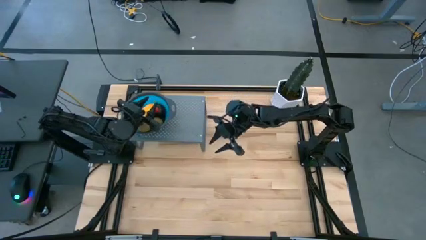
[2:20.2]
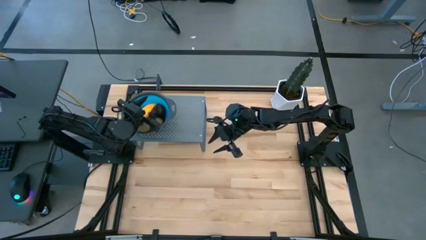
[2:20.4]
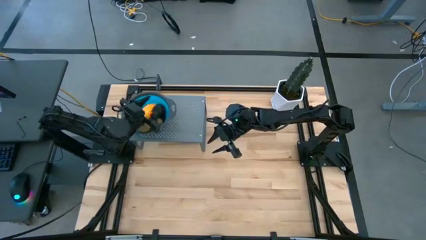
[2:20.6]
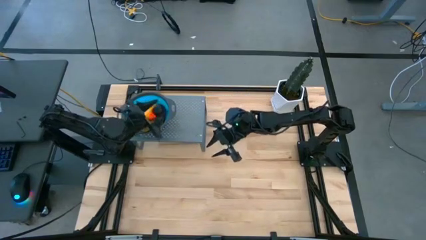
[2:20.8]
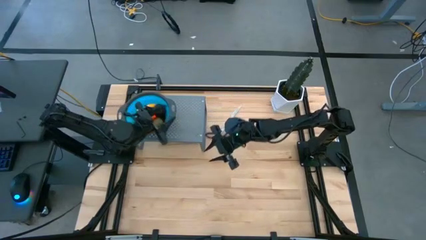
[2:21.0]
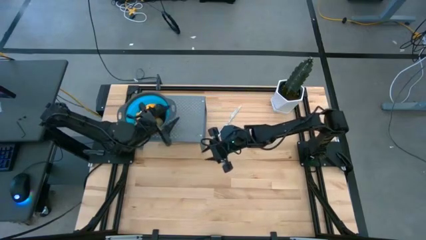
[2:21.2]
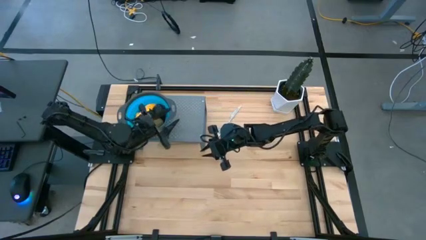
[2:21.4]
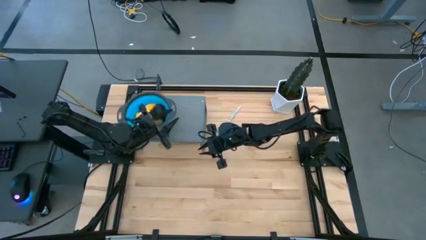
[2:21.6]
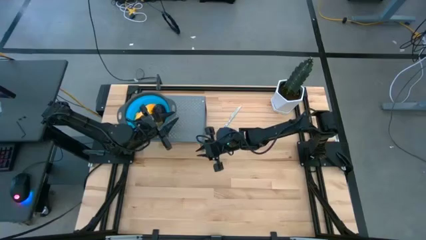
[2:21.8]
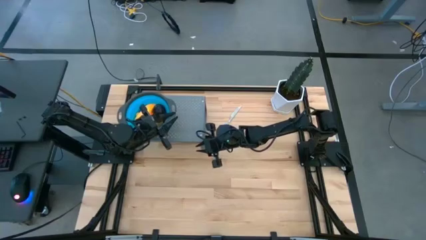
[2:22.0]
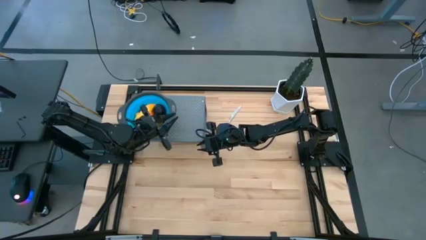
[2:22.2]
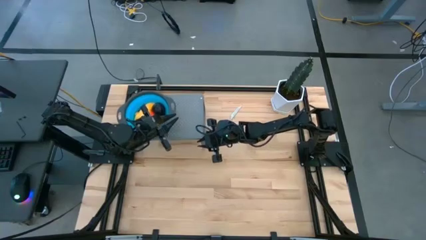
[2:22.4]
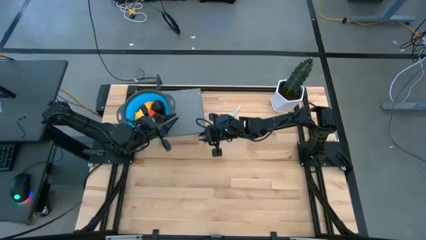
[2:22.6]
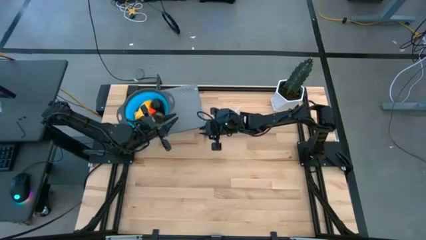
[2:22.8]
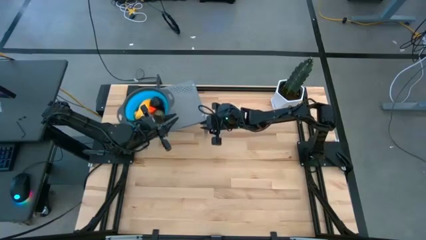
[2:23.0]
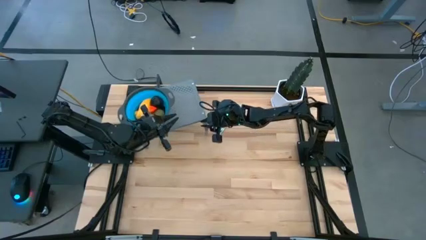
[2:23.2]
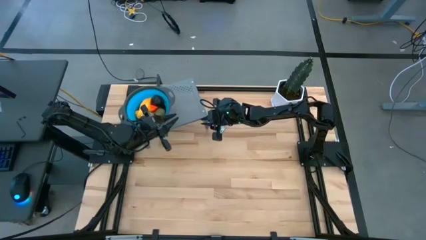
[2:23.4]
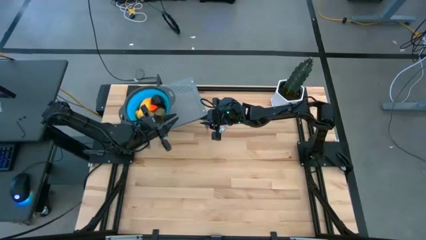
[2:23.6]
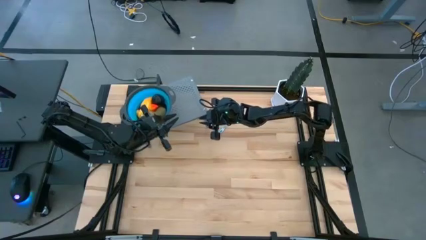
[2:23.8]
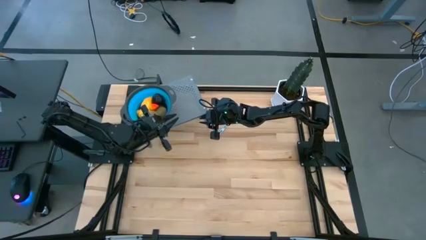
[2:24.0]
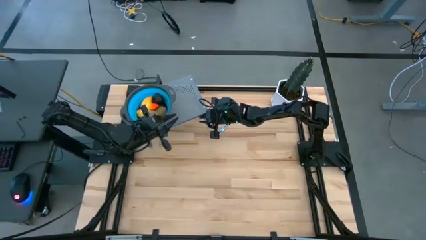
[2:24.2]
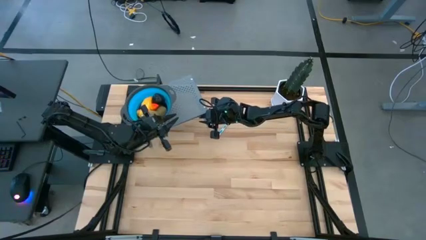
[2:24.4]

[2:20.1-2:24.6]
Task: Pick & Place Fruit
Adjust the shelf

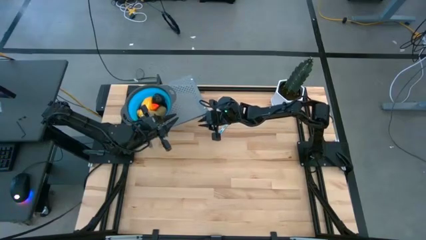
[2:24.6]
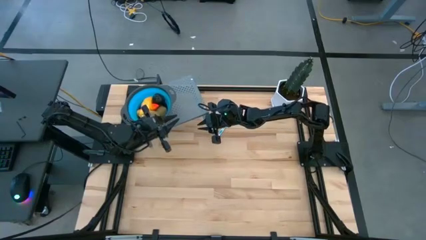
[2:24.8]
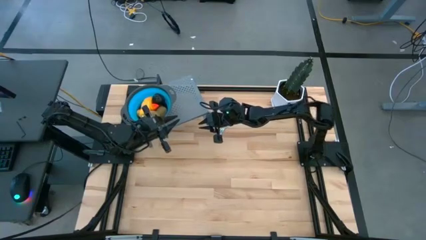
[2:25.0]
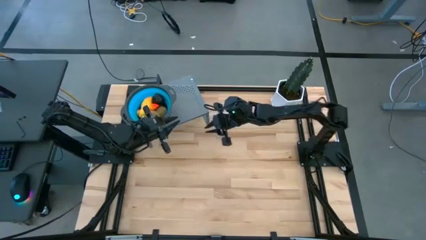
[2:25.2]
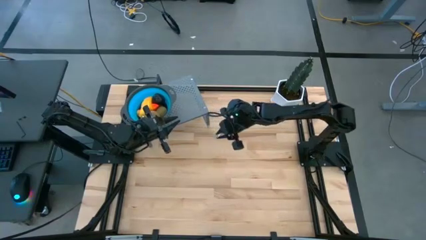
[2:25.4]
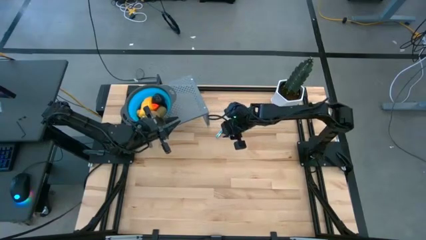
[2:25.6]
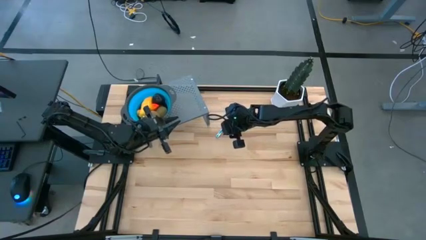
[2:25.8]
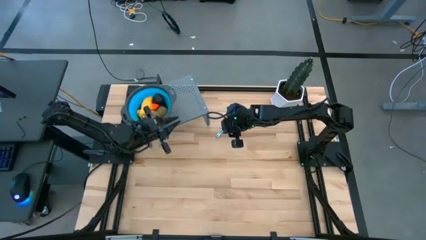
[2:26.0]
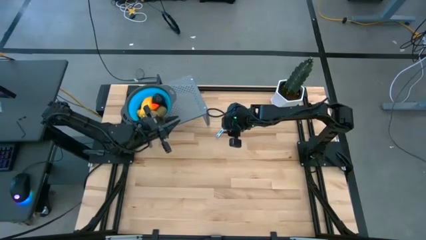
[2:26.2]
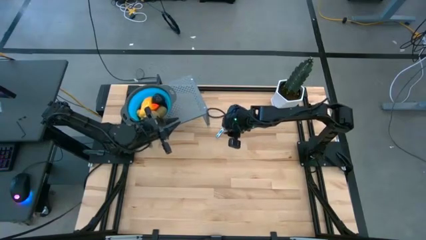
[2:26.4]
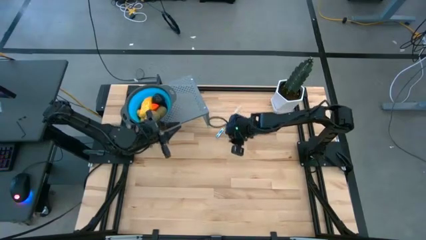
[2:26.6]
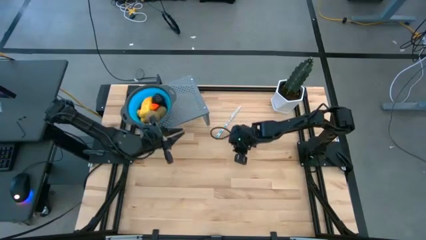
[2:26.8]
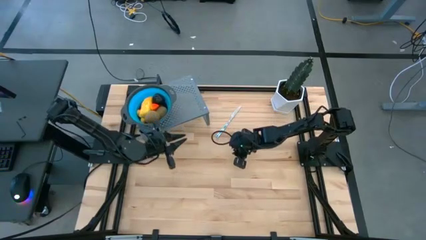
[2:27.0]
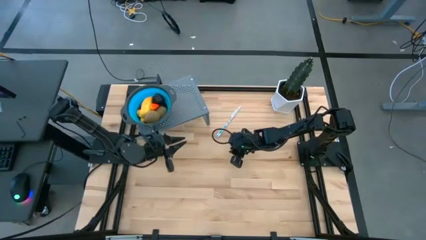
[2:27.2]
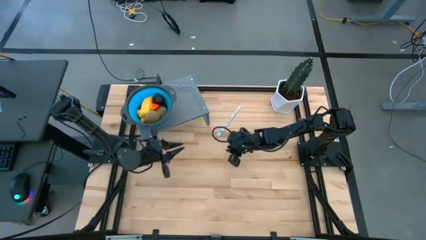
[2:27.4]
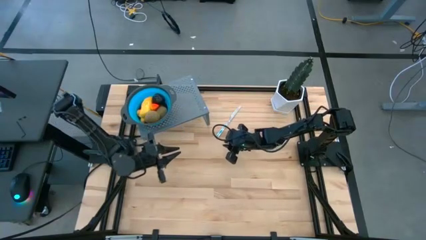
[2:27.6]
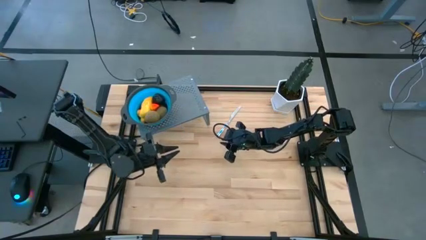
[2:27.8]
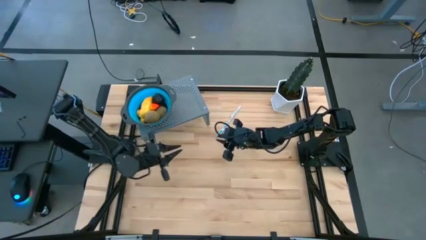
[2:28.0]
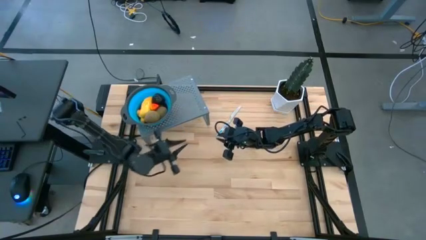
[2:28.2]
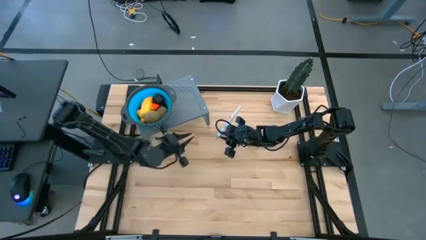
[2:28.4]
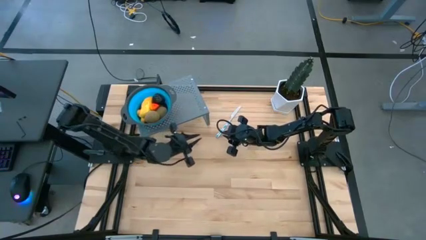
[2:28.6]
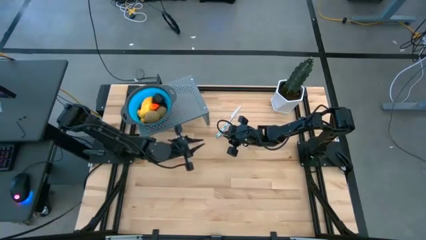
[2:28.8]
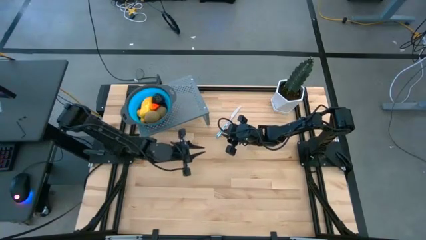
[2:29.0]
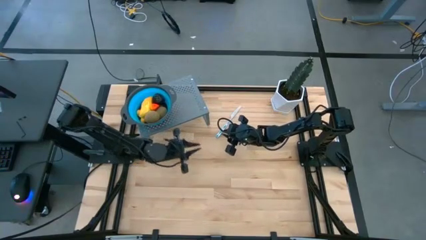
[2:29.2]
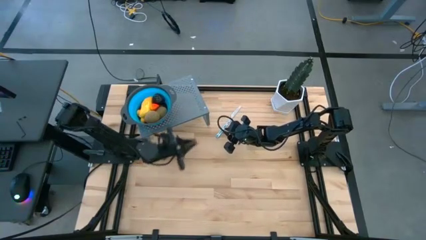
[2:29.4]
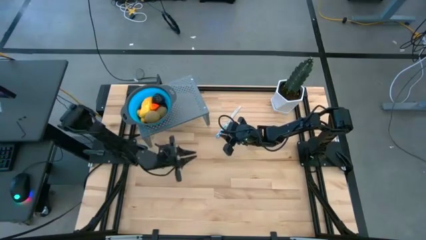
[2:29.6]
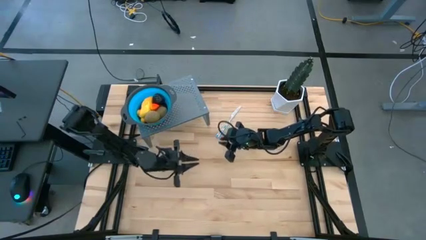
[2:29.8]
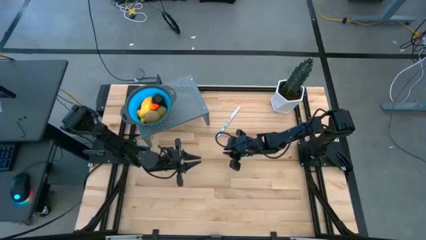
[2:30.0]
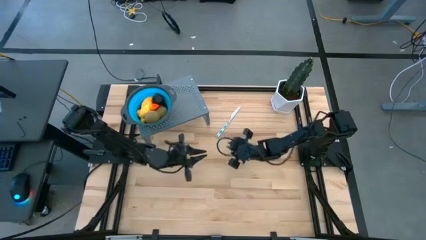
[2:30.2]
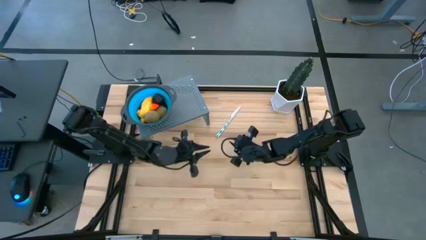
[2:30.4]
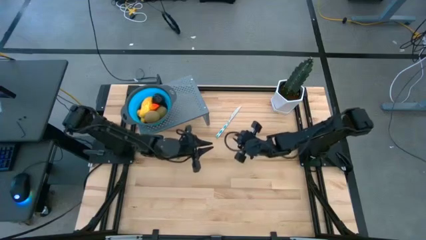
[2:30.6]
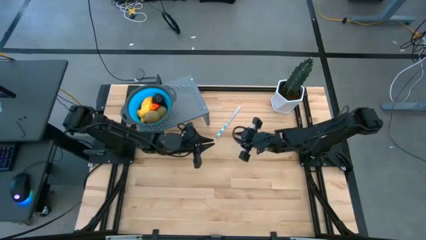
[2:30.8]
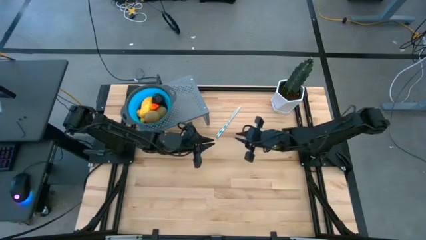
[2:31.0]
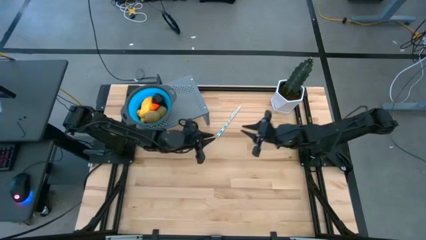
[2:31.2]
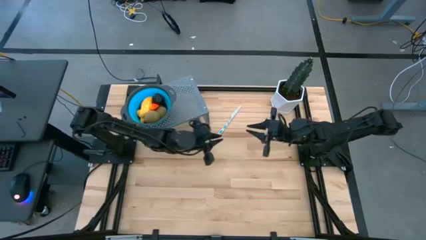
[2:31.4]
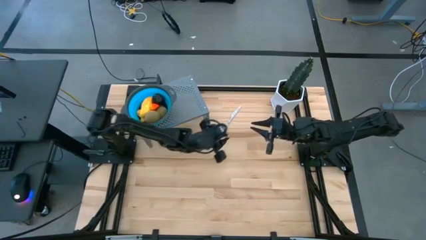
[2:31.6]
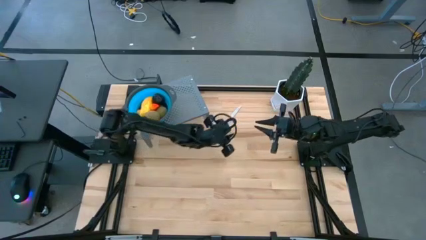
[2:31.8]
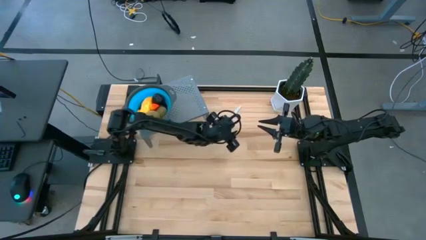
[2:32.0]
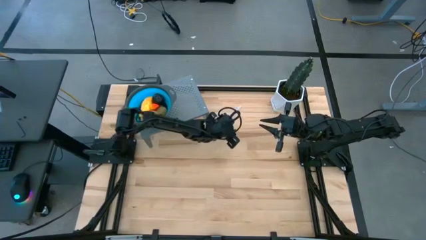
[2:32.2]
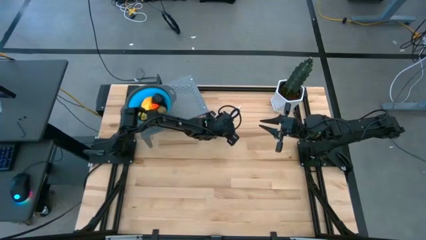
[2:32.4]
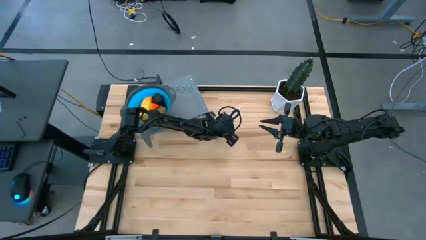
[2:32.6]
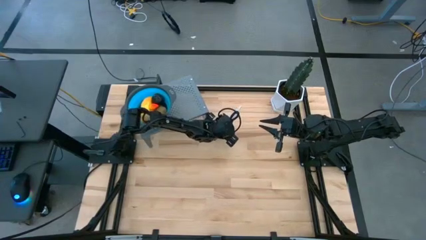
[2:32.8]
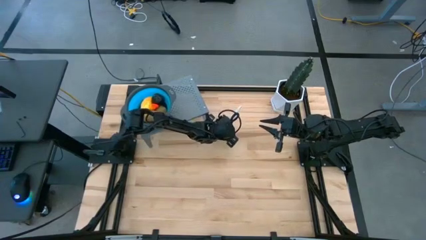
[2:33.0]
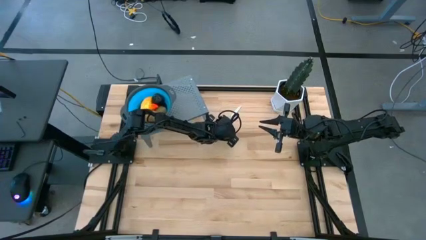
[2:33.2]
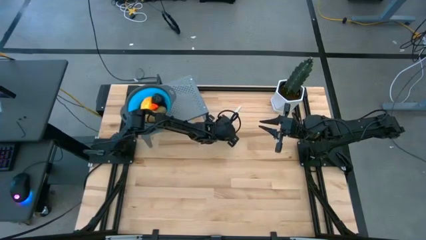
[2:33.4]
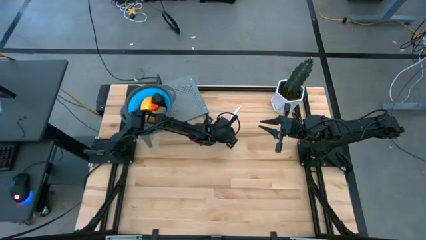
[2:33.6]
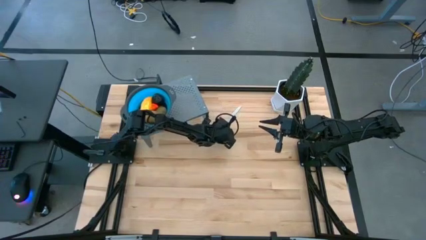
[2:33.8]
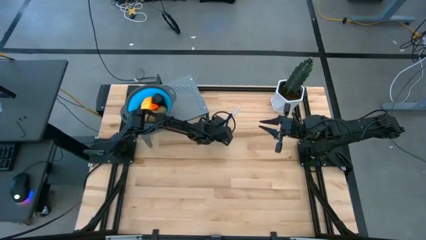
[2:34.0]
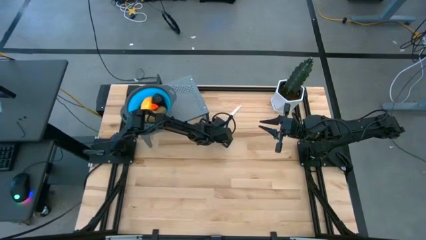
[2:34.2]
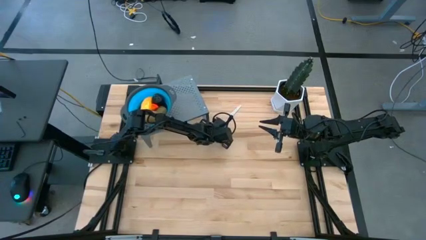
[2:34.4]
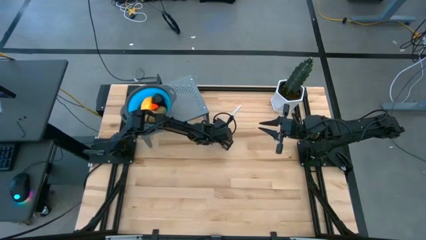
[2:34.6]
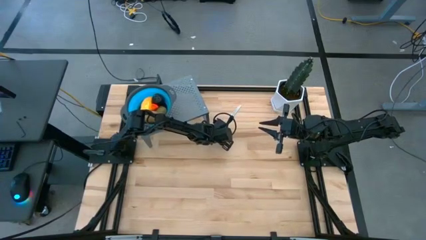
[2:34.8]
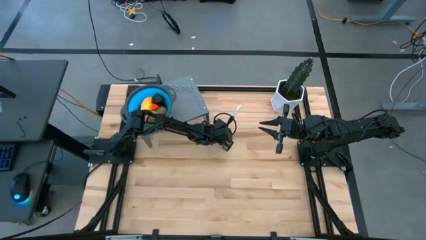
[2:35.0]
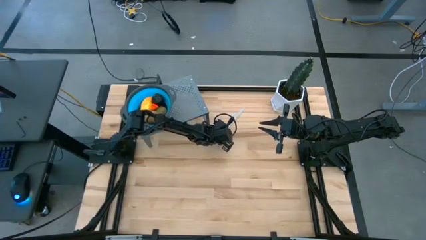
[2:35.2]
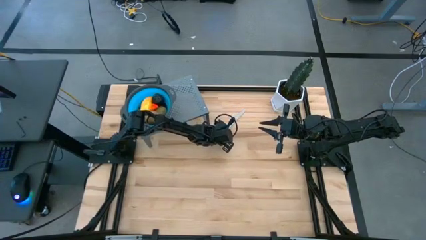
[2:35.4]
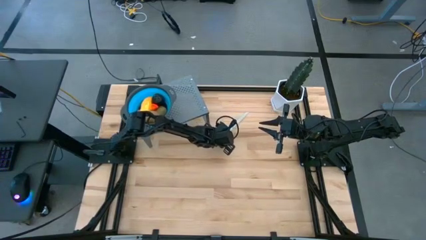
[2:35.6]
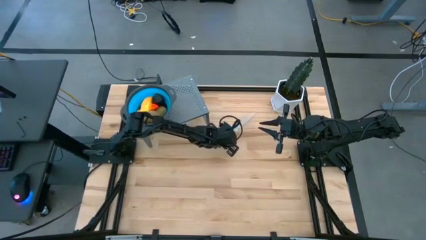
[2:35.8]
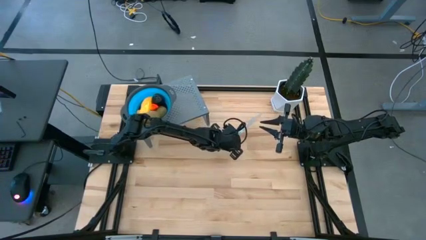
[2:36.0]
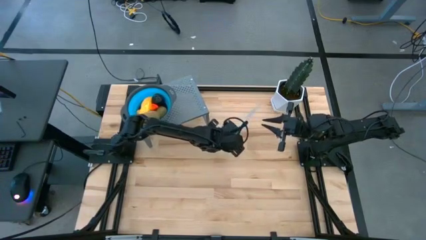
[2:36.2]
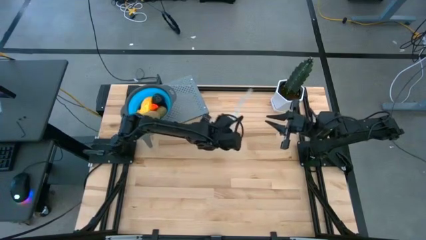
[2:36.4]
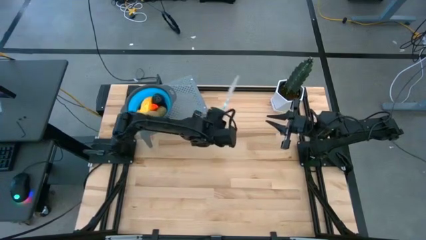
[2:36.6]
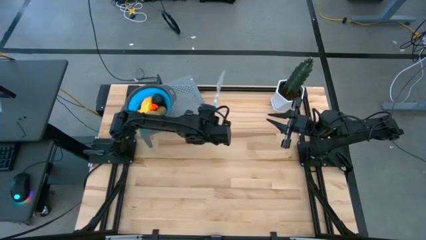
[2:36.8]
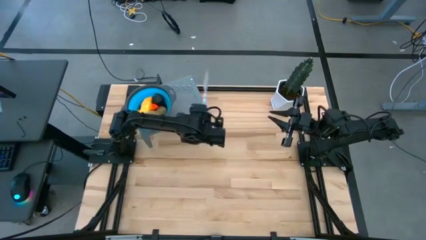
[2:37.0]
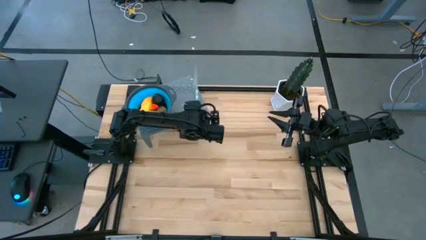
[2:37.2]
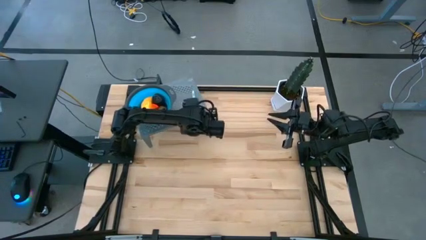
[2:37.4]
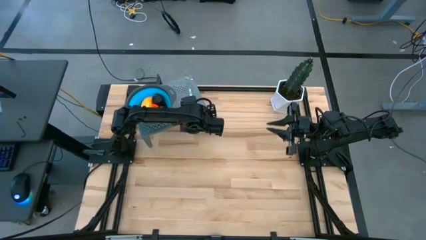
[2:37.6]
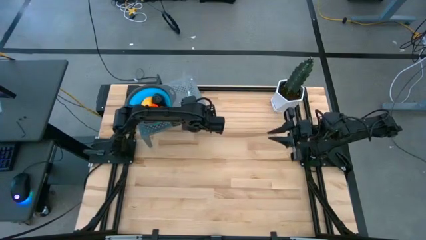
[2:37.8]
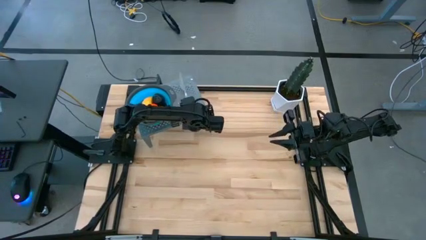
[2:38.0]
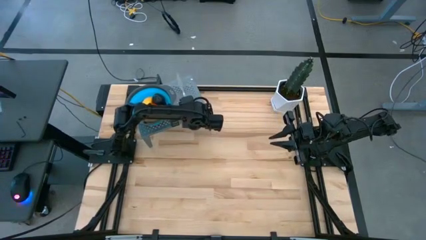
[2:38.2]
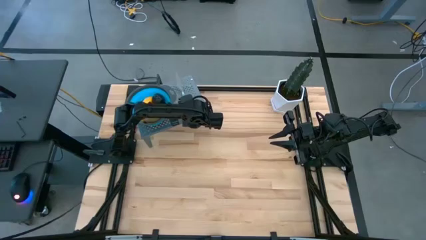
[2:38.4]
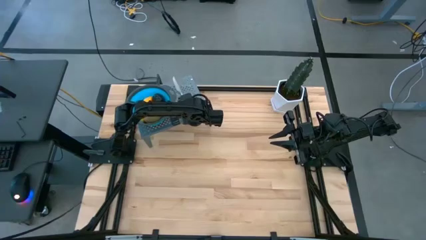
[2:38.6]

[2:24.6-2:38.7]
Put the blue knife on the shelf
